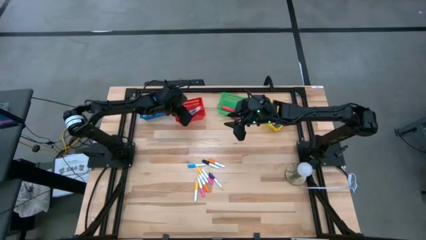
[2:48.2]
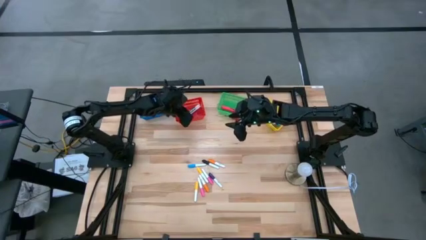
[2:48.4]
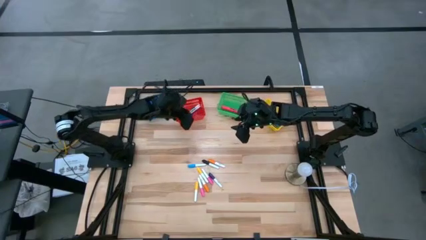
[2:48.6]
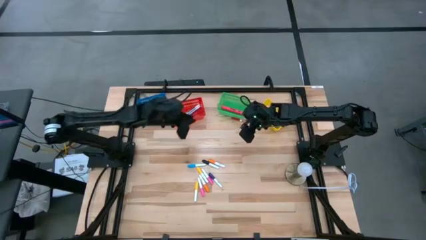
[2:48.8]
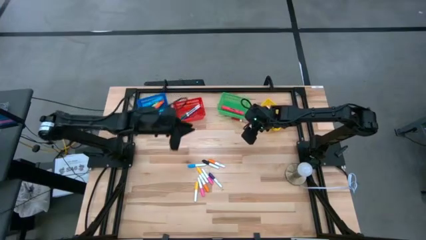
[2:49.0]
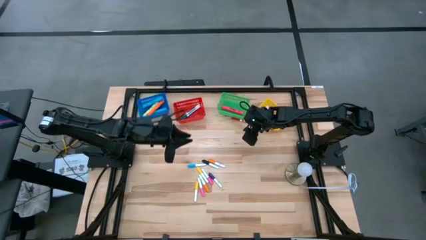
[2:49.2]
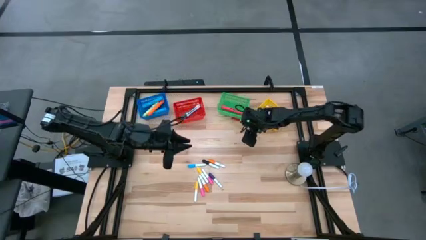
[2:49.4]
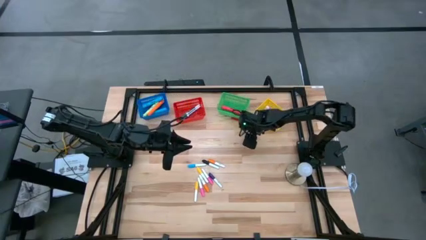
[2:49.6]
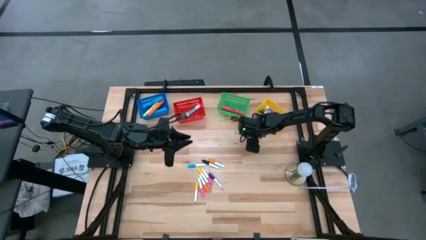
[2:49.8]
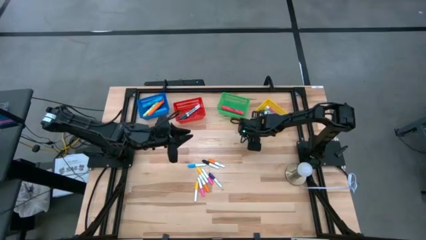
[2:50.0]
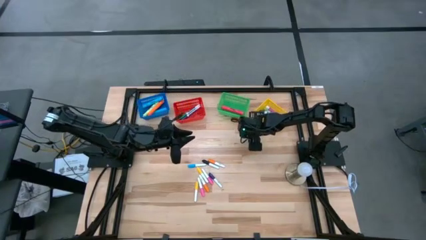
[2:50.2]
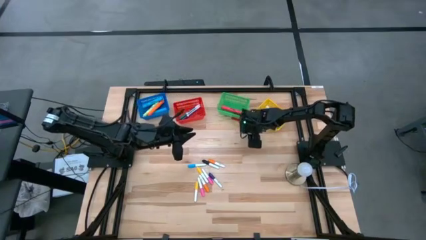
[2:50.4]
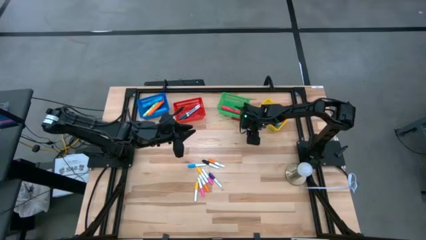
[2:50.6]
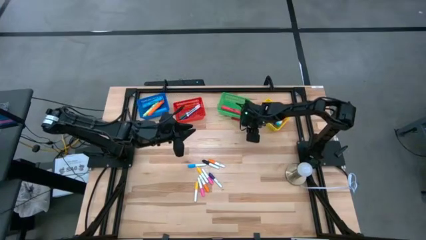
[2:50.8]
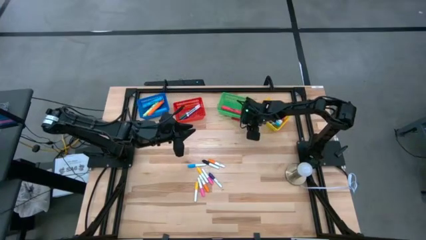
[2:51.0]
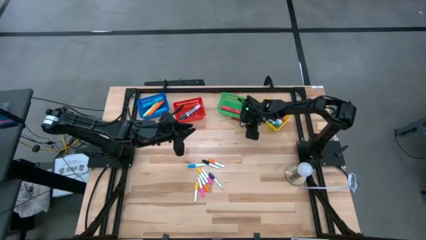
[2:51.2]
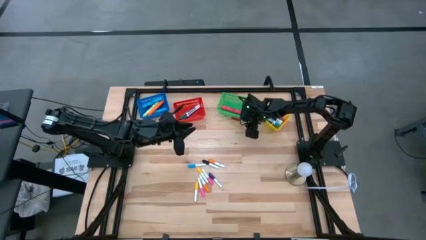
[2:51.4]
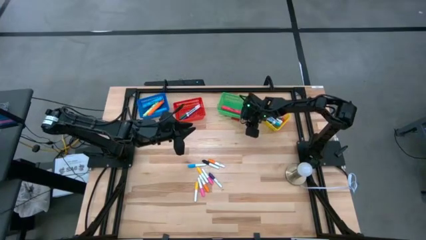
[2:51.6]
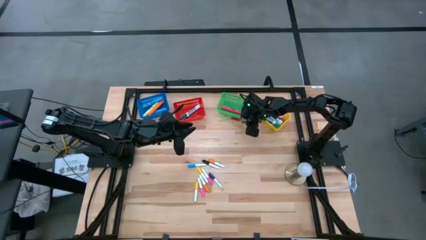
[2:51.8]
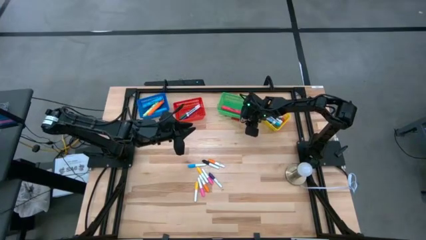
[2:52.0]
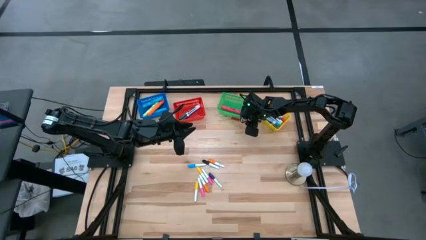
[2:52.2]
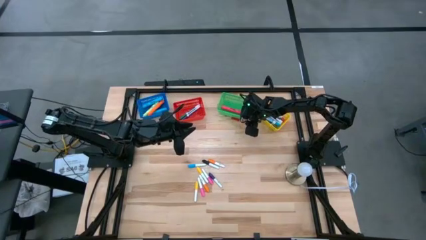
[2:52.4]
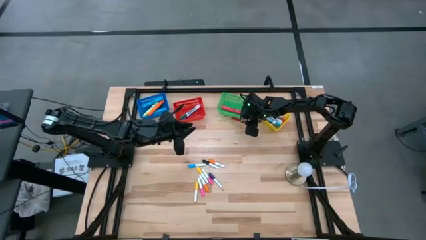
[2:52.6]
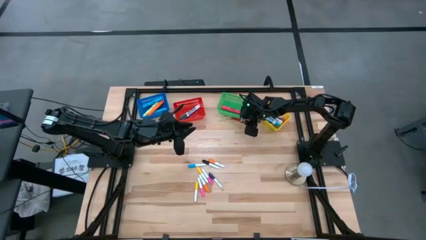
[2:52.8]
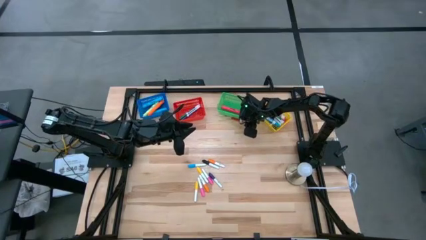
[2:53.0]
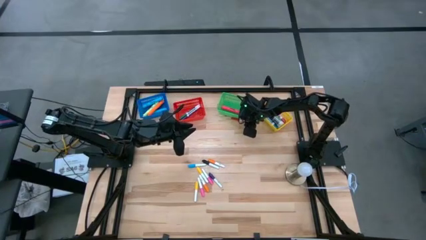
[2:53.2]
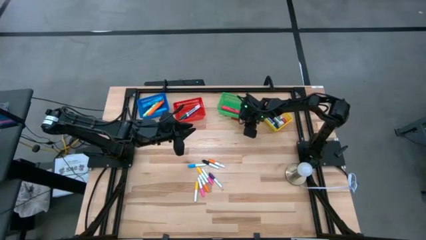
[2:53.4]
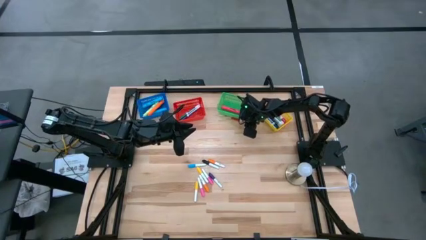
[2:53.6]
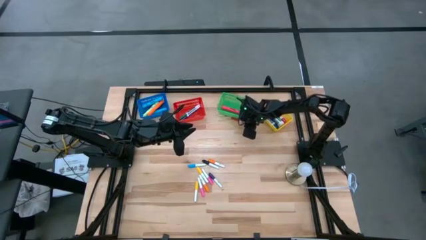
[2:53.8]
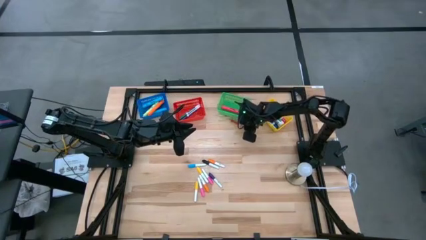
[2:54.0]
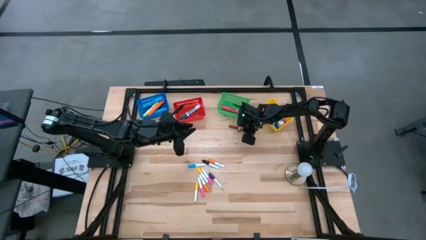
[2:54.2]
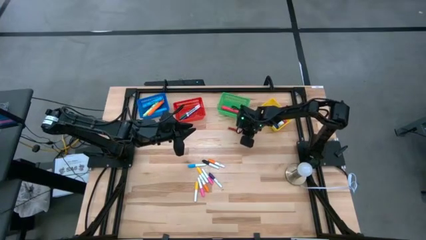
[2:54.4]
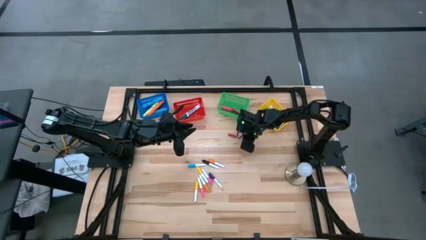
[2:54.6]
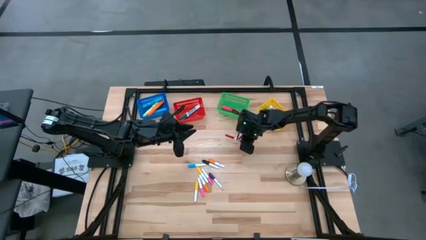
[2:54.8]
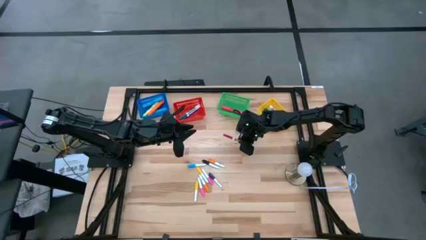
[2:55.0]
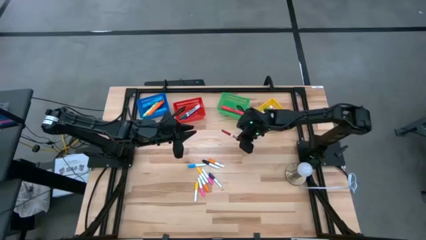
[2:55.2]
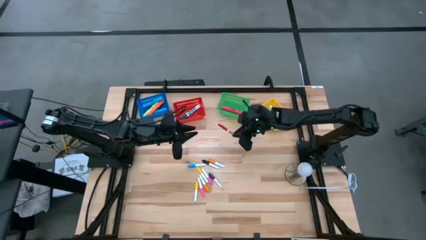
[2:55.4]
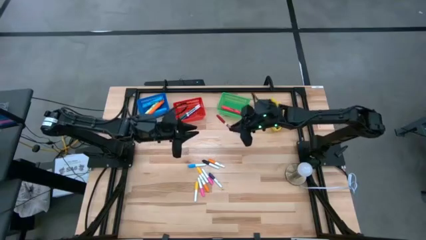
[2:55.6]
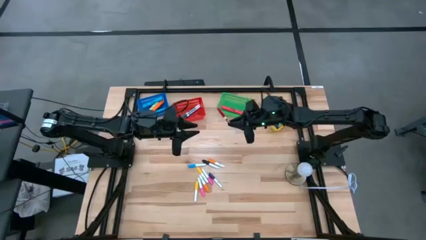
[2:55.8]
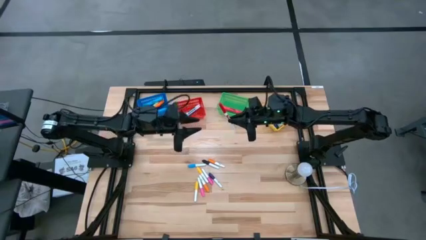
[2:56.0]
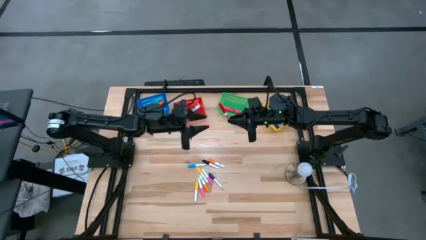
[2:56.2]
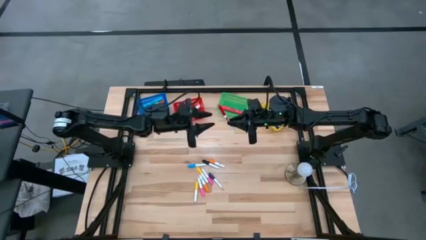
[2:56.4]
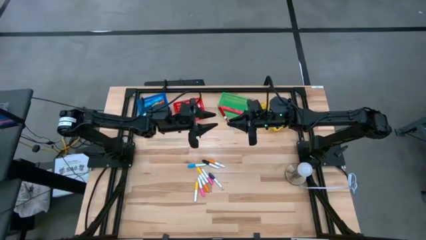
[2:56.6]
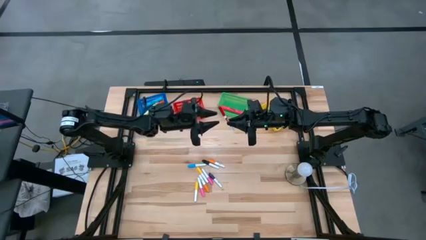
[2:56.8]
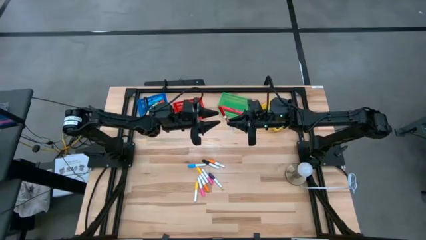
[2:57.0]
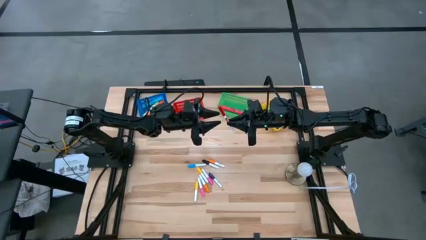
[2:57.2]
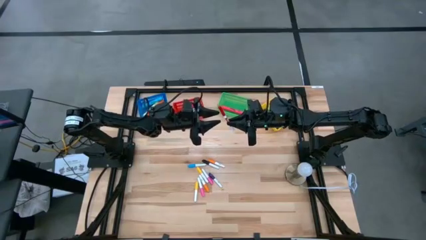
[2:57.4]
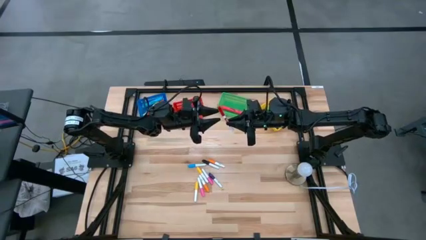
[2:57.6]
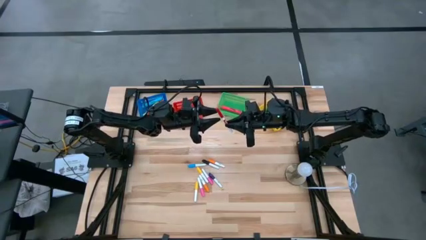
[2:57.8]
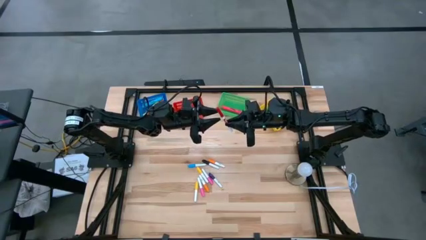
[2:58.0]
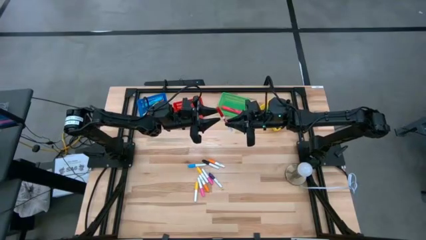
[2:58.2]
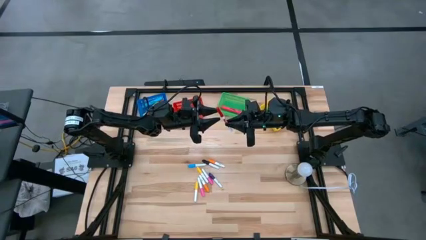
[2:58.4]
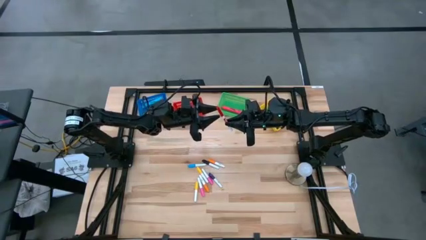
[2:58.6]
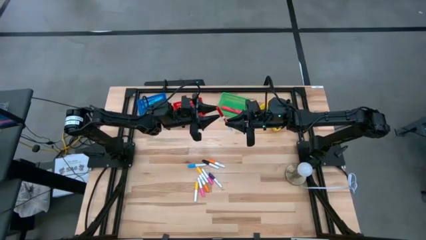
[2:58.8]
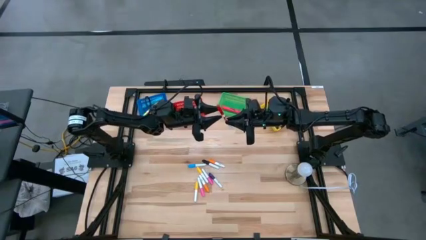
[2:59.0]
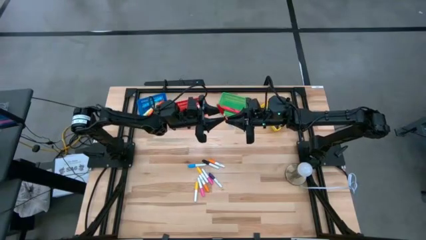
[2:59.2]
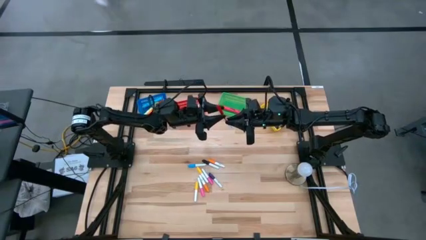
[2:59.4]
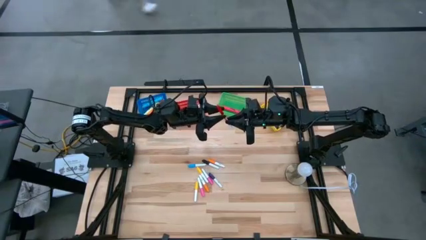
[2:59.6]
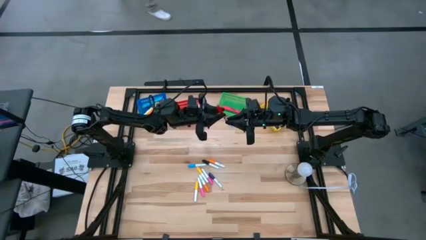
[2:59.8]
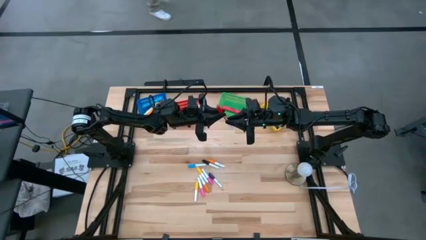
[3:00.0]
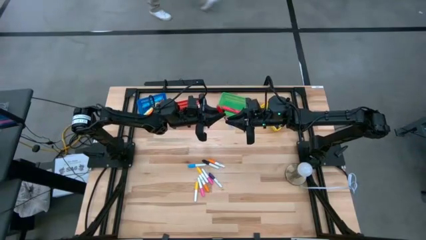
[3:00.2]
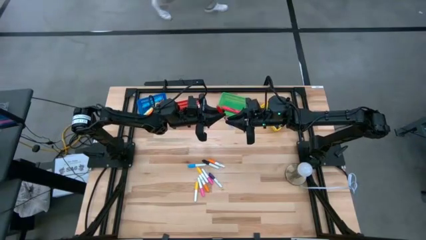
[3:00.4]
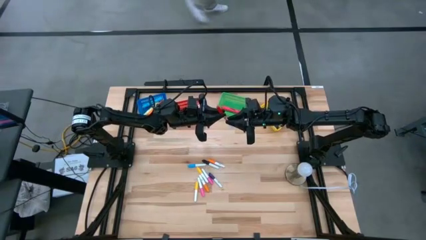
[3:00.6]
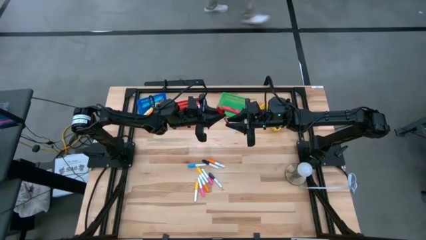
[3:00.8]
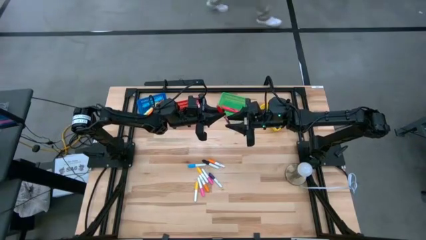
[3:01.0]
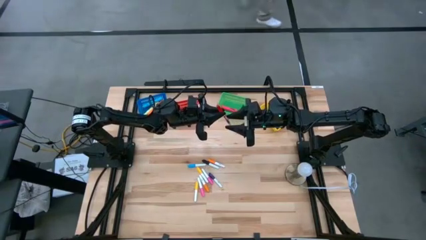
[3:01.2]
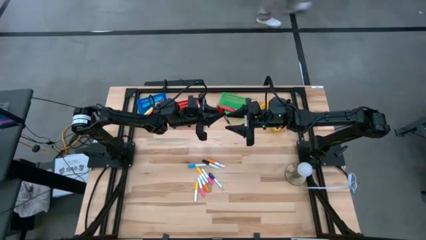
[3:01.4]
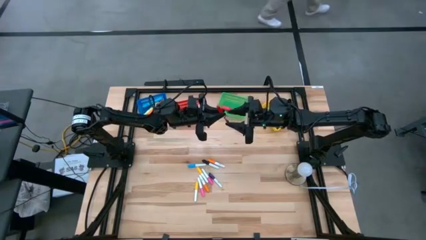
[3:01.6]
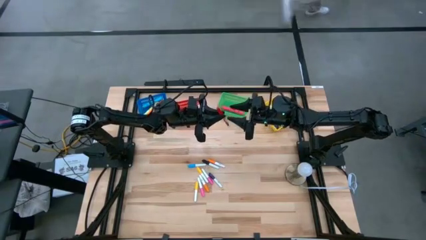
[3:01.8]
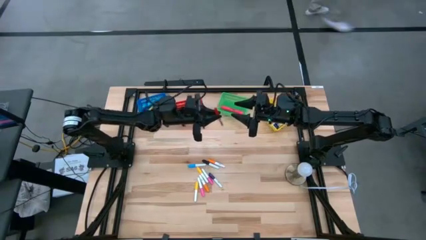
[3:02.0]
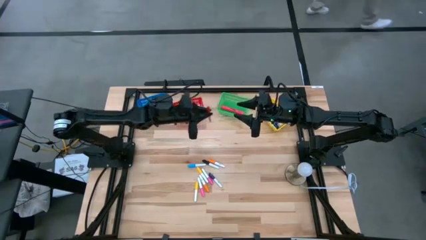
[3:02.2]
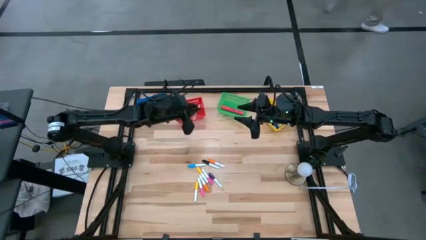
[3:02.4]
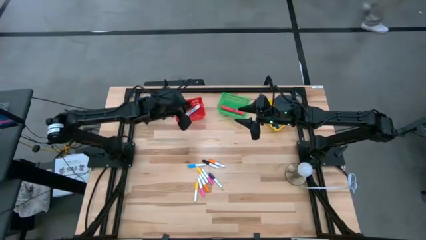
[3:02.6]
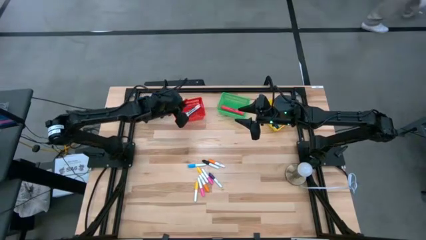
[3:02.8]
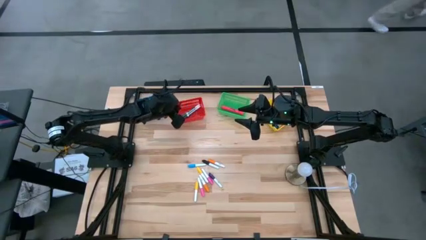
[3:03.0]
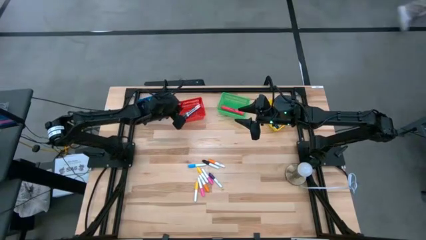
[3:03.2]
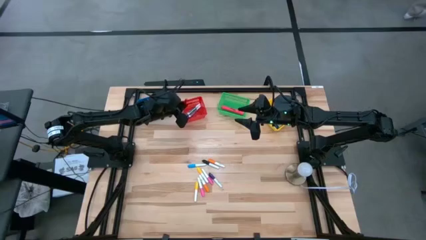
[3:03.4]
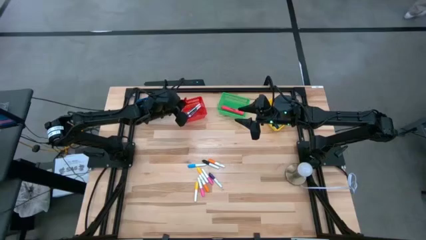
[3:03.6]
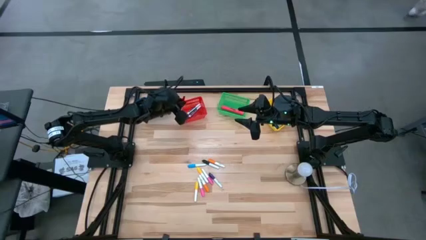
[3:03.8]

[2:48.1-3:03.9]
Task: Pick & Place Markers
Put the small red marker pen into the red bin

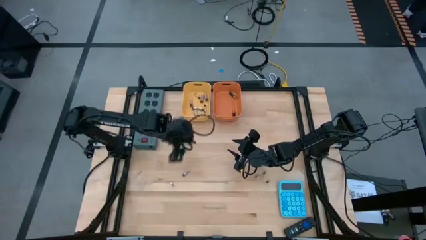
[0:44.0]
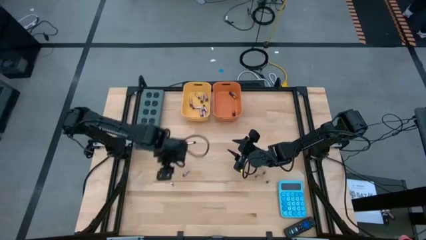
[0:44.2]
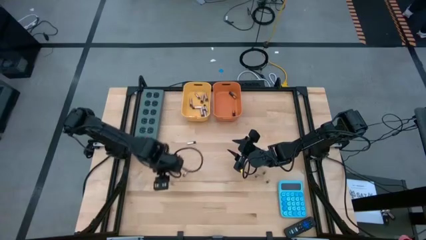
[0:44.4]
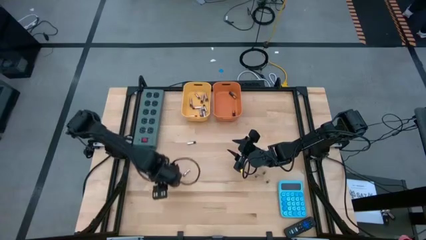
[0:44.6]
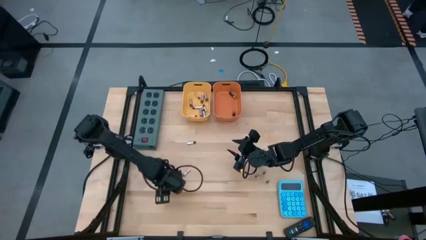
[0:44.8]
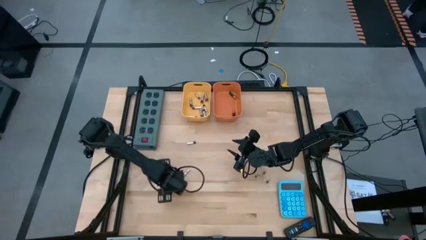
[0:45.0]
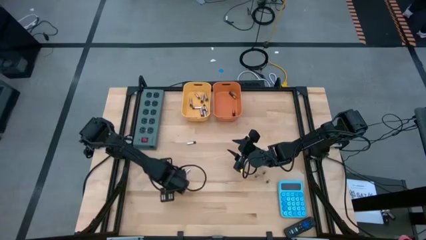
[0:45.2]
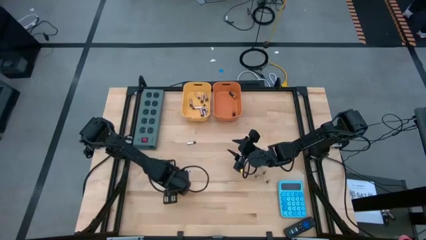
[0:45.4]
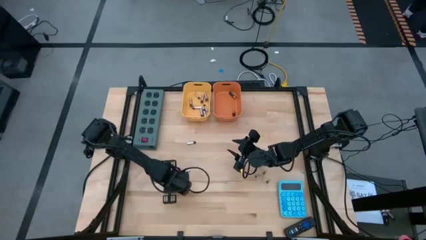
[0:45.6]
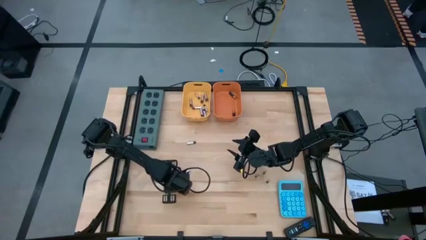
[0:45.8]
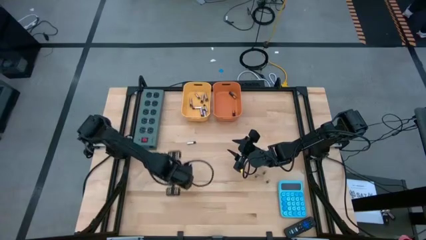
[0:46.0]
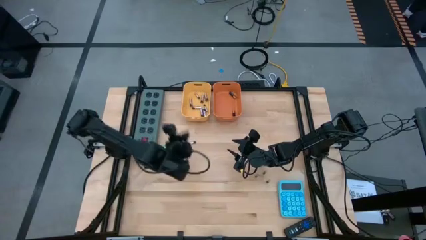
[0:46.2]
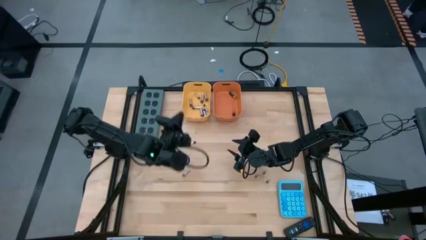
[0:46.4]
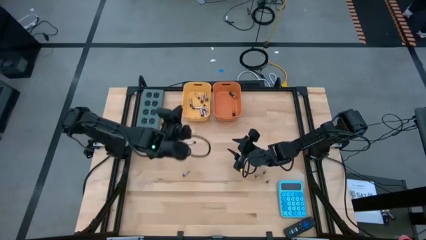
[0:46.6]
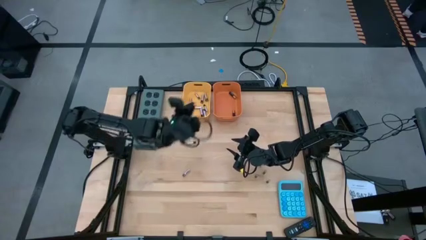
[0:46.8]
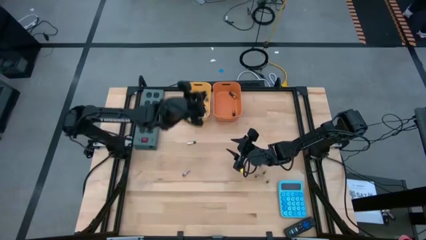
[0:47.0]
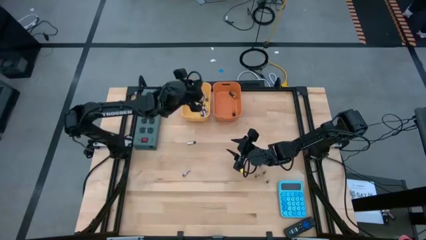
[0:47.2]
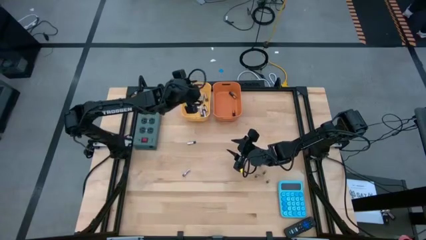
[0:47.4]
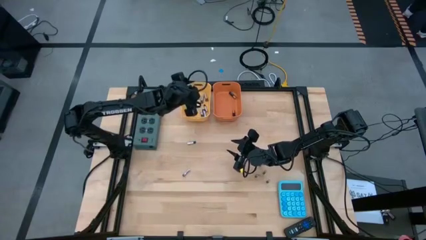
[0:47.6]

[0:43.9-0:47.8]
Task: Sort batteries
Put the silver battery into the yellow bin
